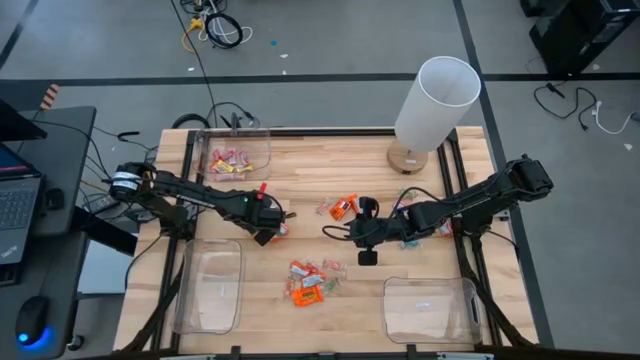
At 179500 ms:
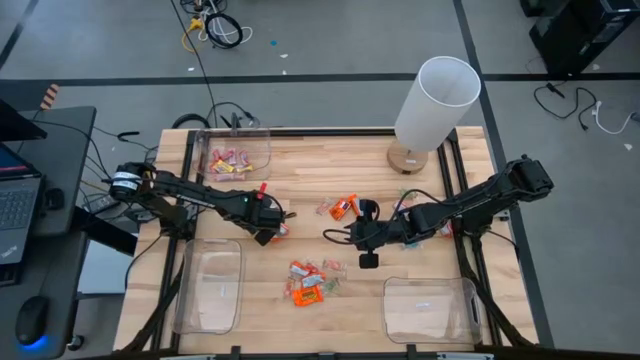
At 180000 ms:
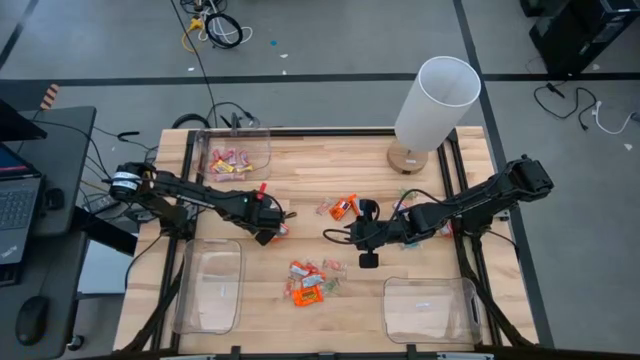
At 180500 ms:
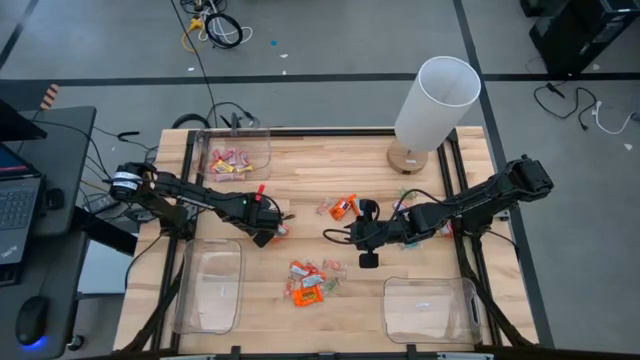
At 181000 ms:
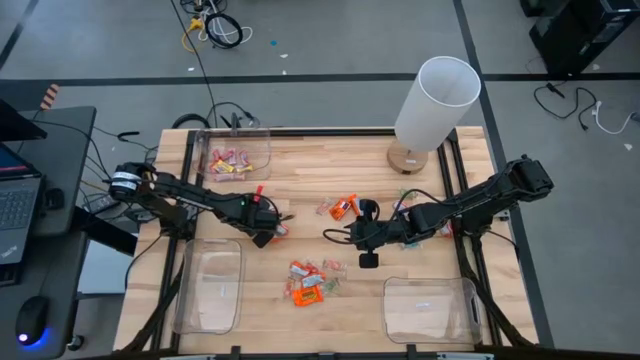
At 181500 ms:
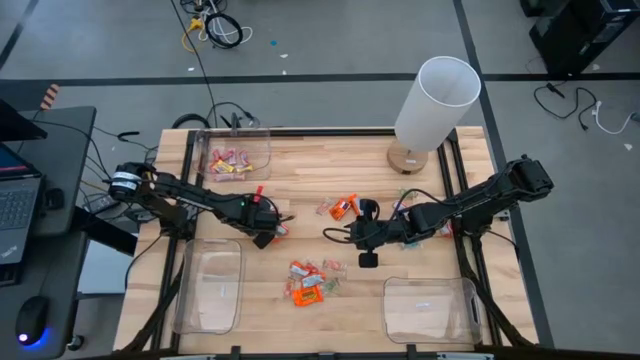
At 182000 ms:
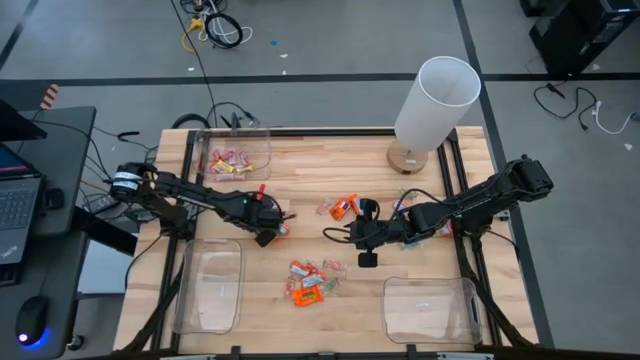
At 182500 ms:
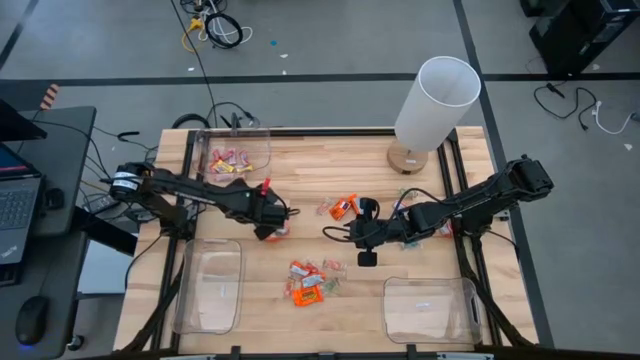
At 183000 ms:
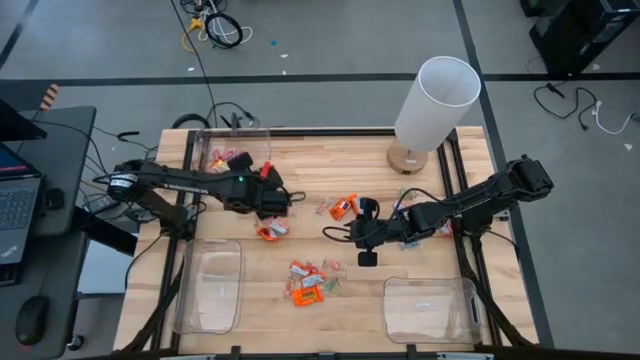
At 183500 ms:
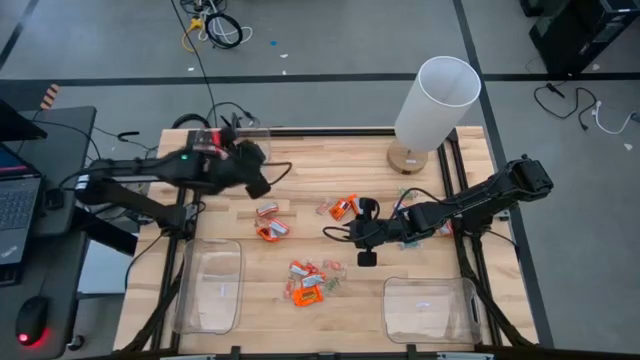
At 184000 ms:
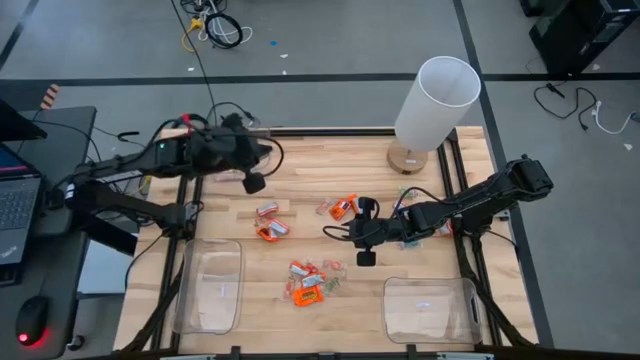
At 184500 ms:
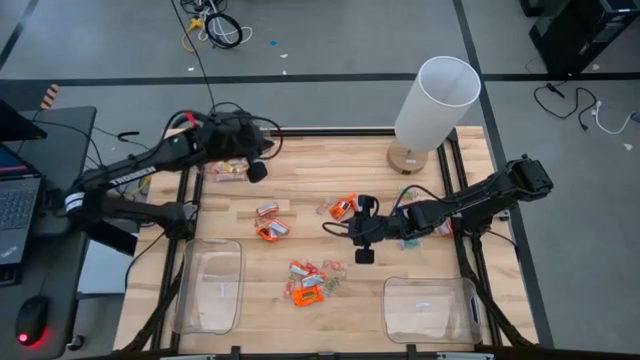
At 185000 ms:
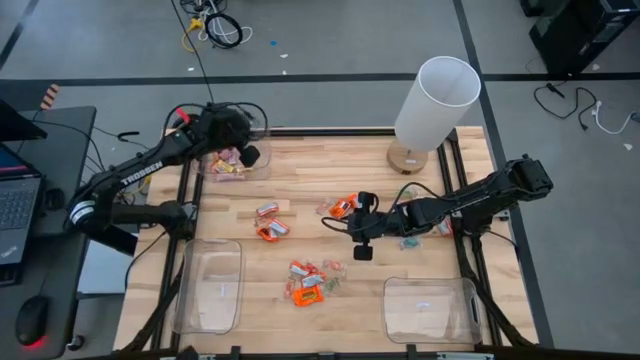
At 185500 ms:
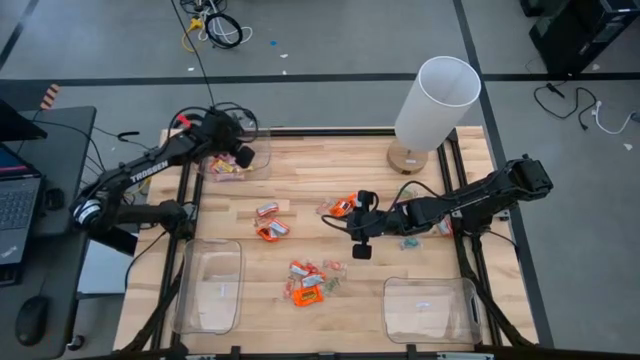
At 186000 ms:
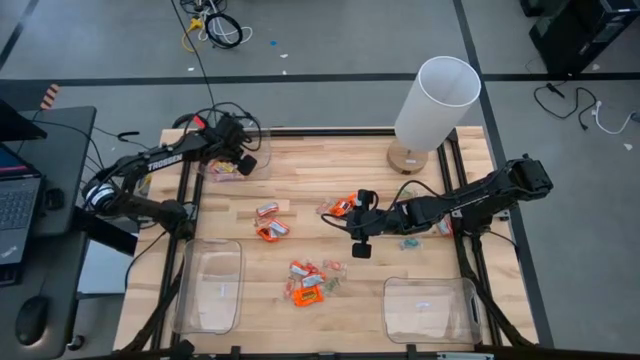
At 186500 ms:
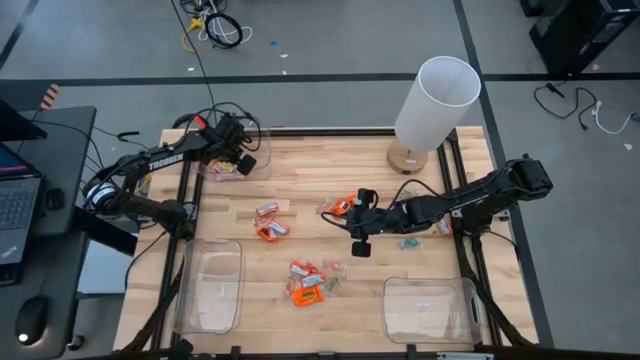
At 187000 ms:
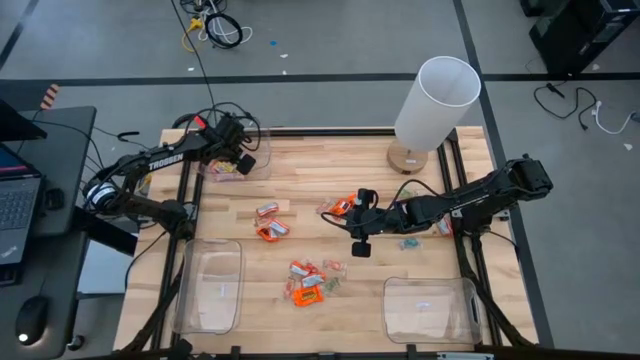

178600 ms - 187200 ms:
Task: Sort candy
Put the yellow candy into the top left transparent bin

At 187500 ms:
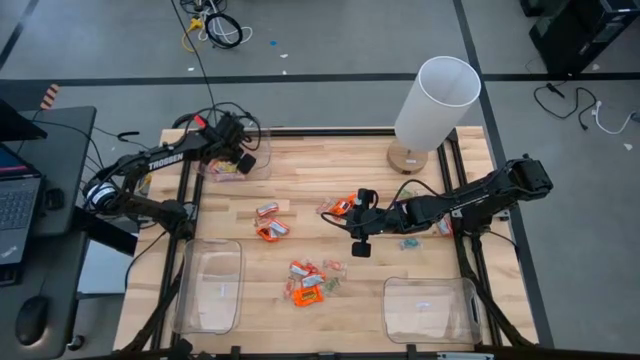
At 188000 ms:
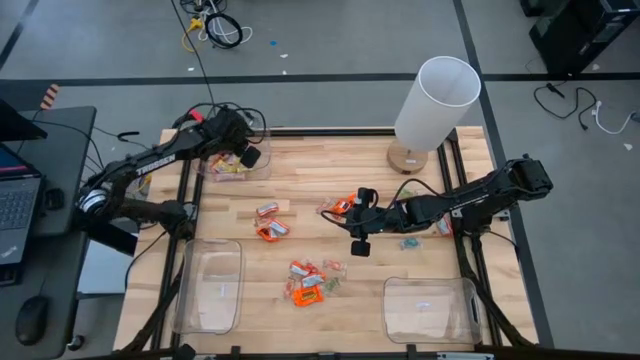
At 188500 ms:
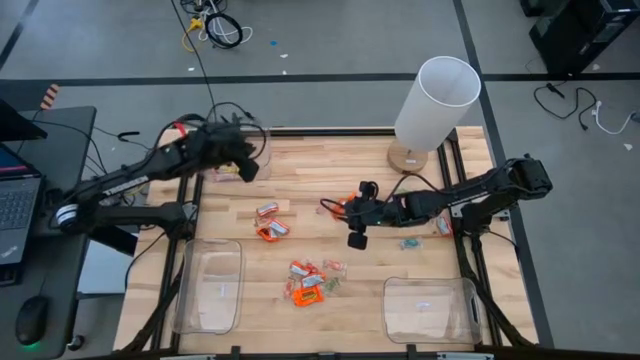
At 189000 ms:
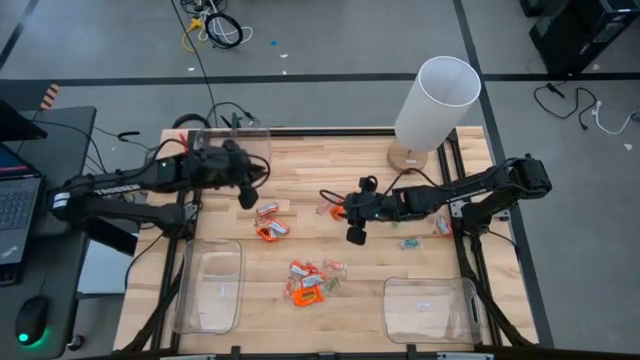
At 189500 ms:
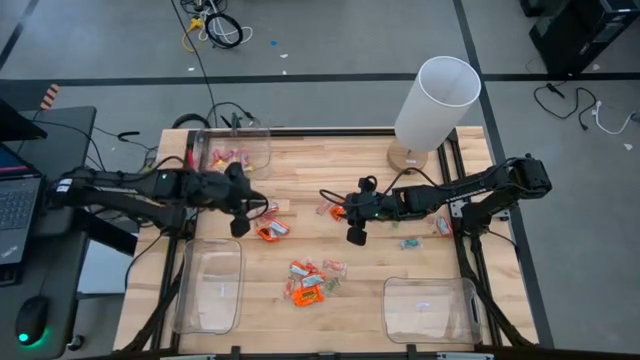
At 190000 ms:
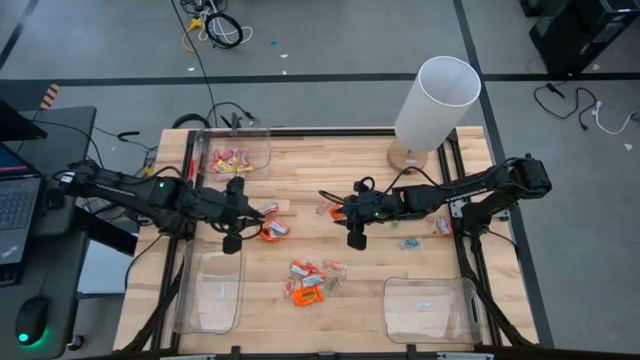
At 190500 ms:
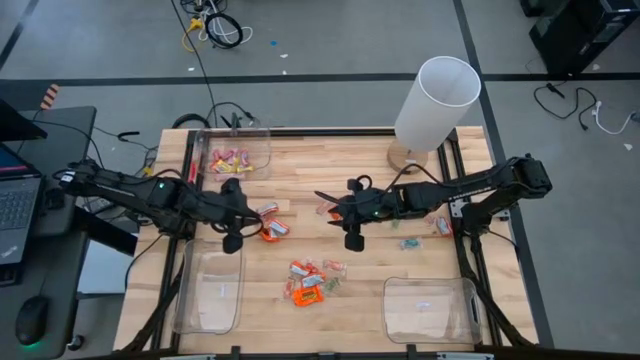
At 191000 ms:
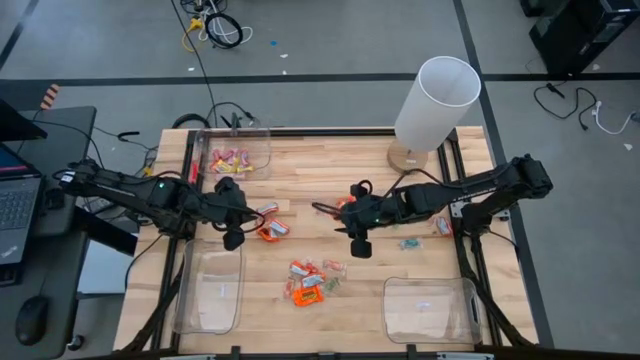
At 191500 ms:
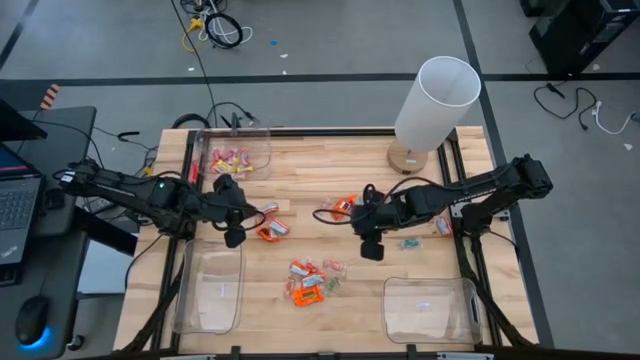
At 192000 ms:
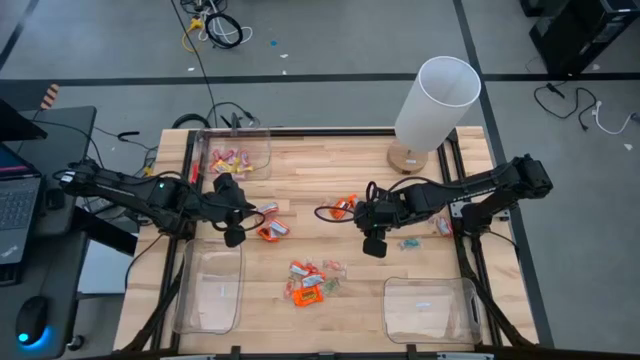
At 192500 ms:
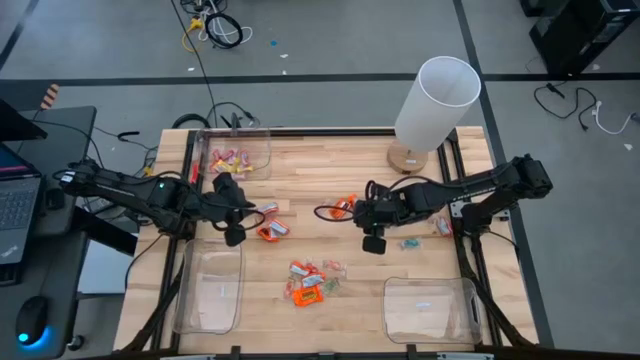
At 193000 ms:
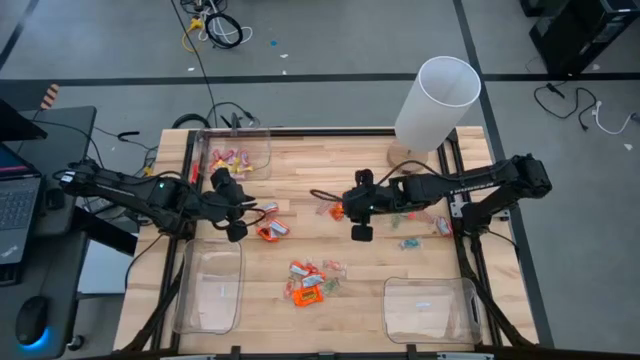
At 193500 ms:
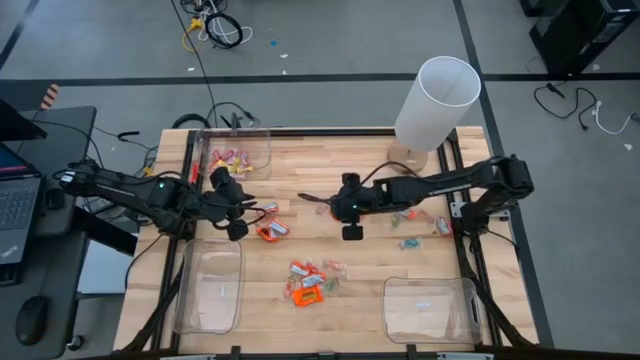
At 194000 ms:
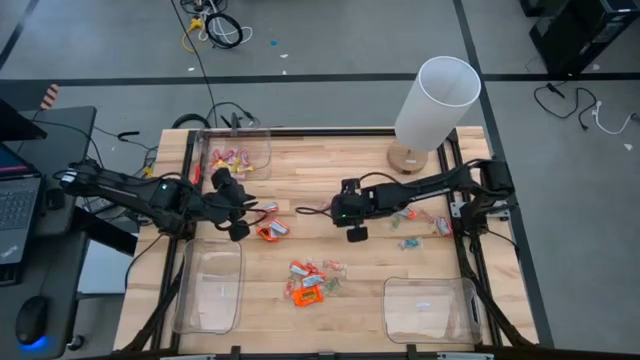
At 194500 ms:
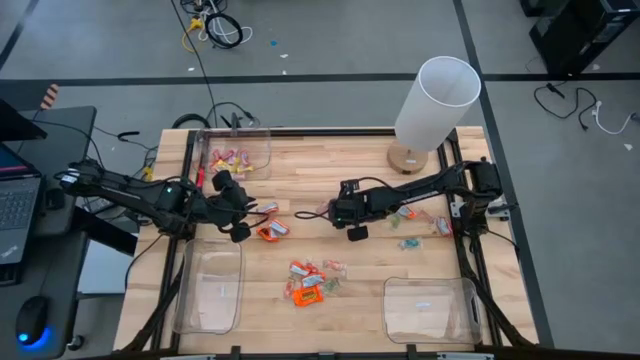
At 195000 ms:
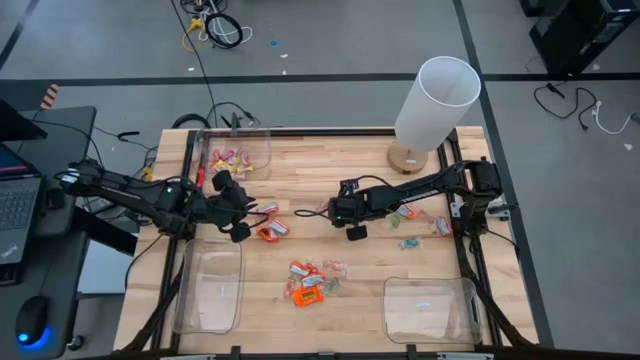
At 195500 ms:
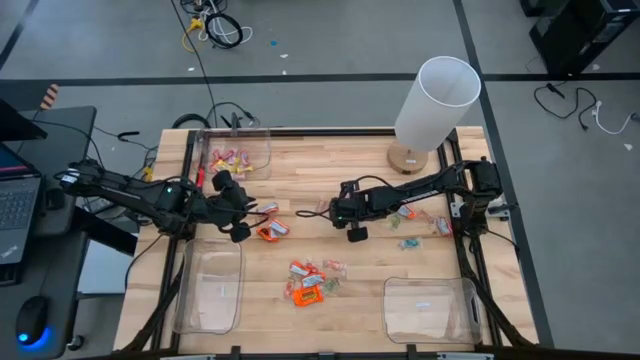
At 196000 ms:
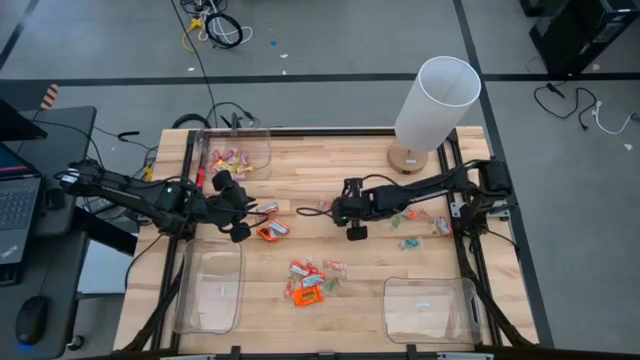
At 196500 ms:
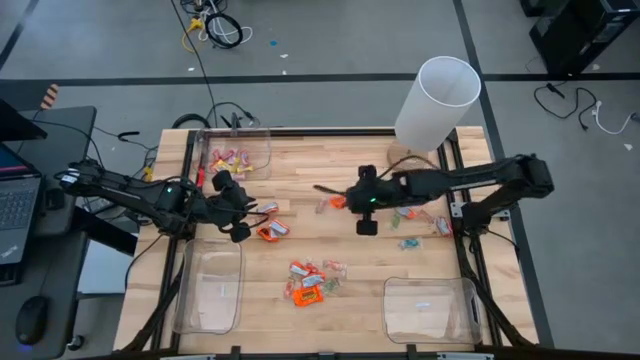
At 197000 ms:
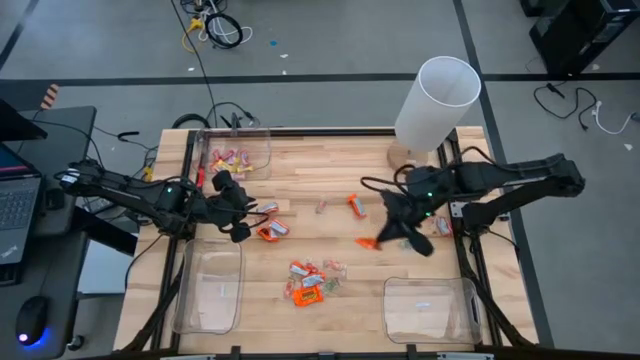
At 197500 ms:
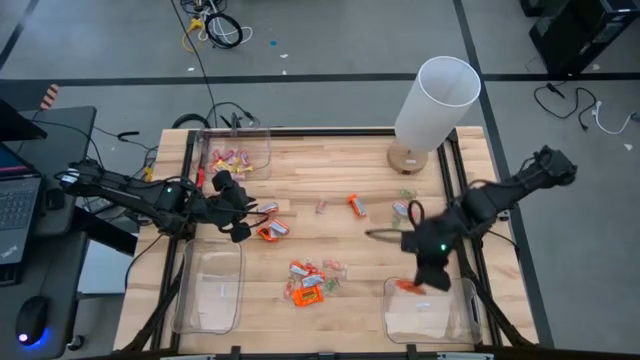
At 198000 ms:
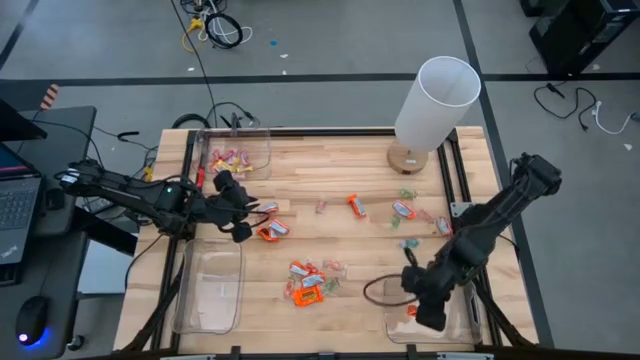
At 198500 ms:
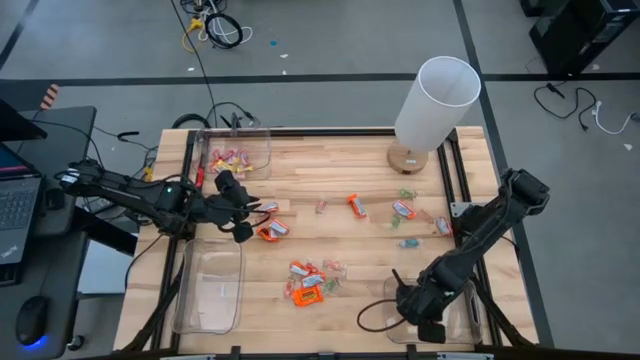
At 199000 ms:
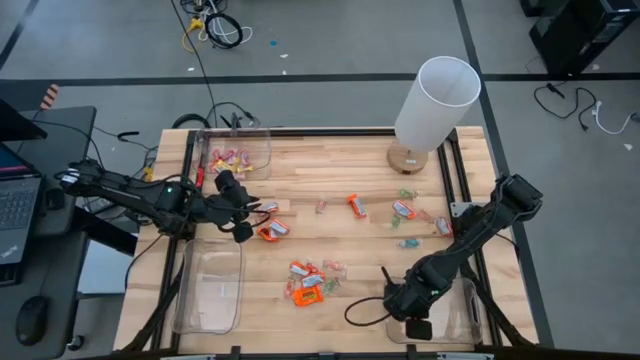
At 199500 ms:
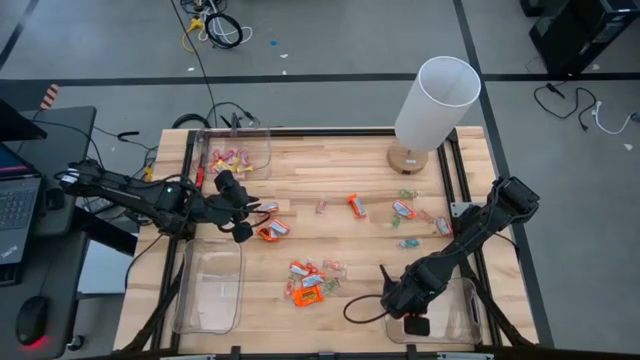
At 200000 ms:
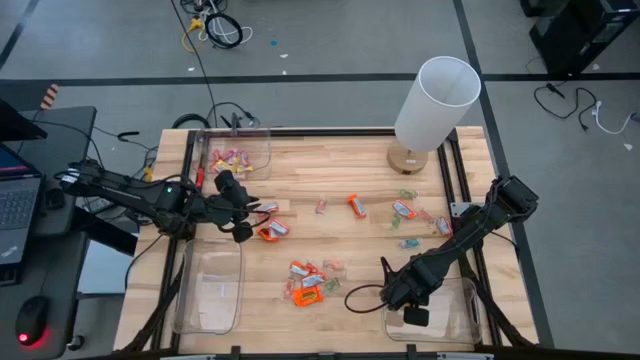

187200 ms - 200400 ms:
Put the chocolate into the bottom right transparent bin
